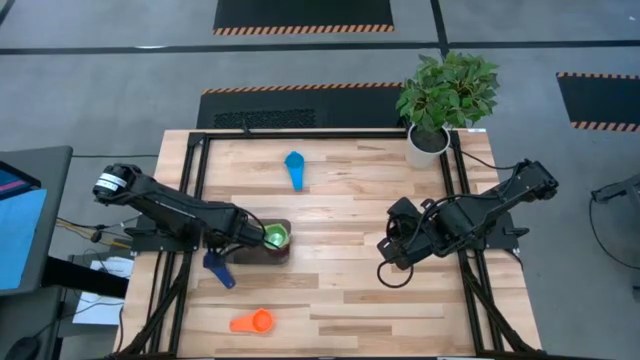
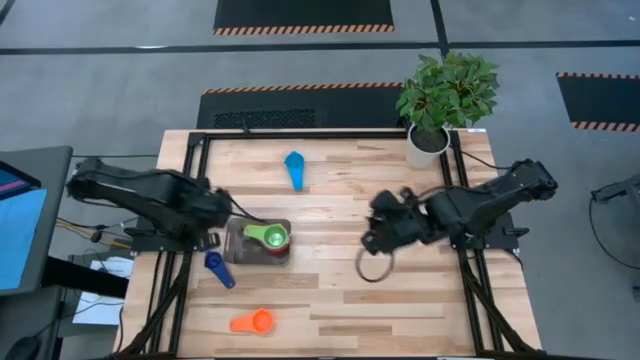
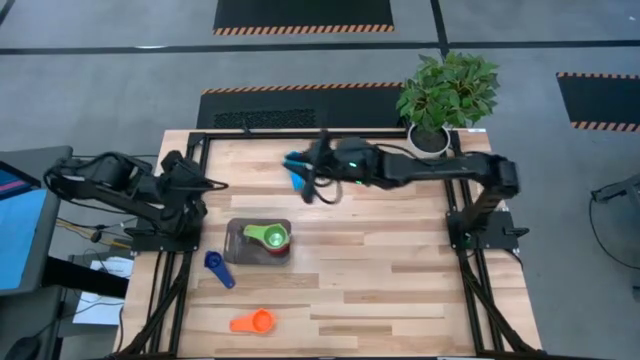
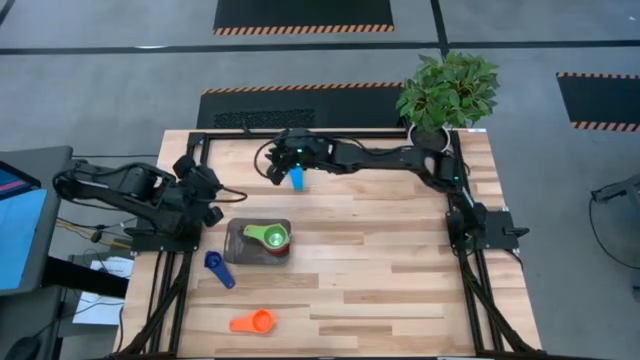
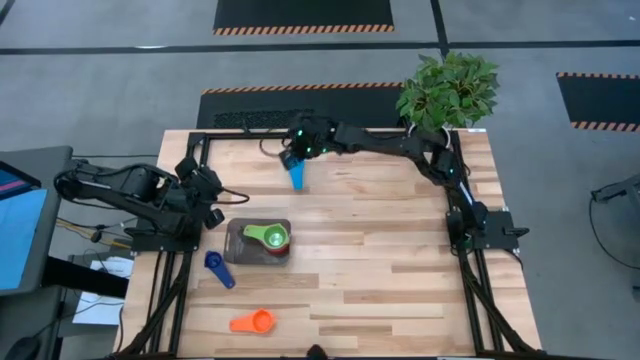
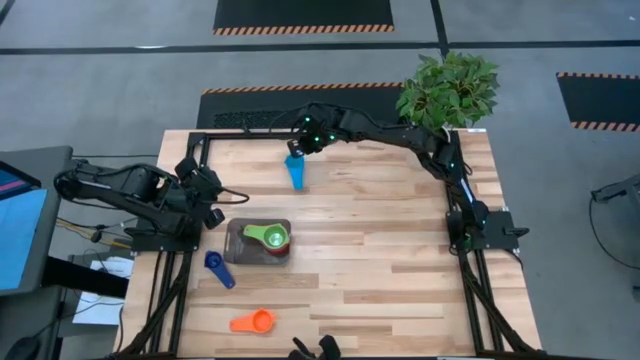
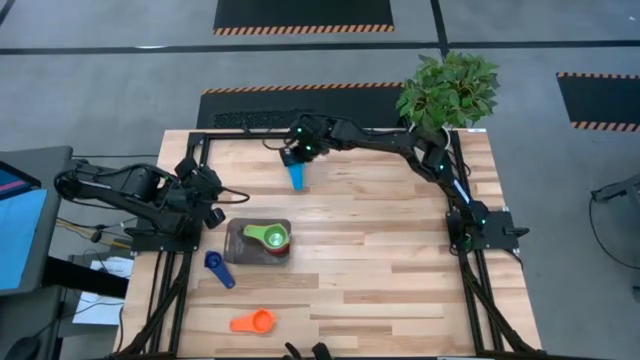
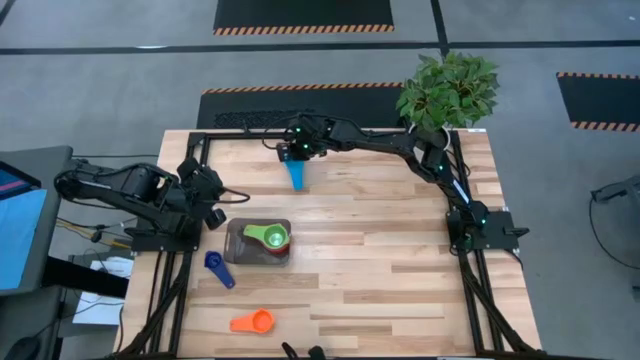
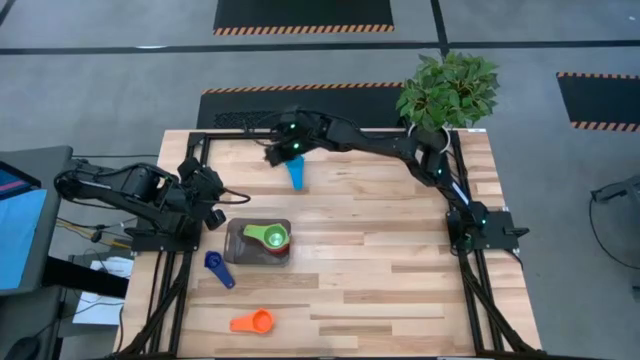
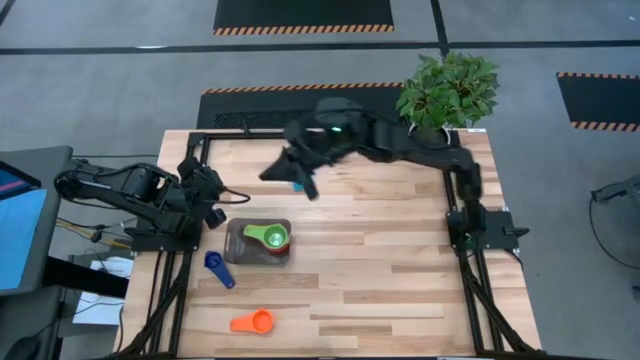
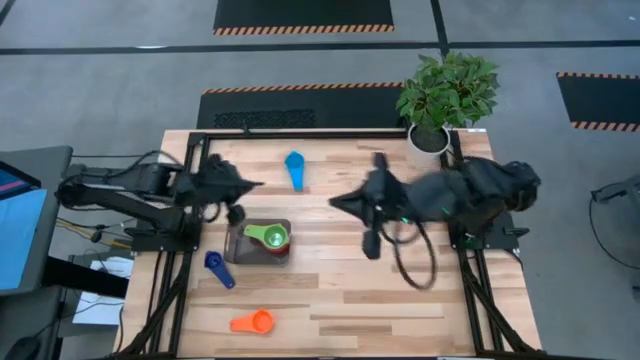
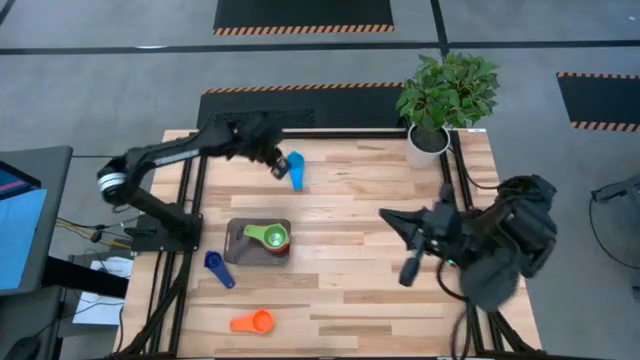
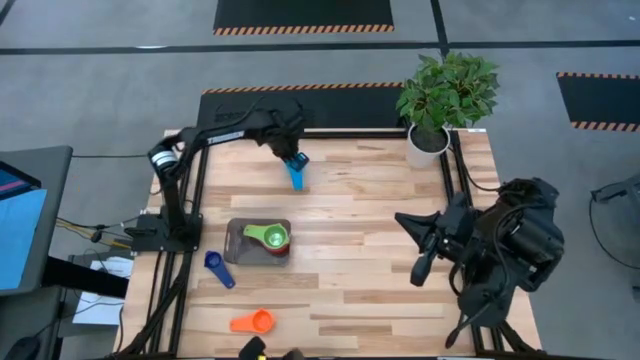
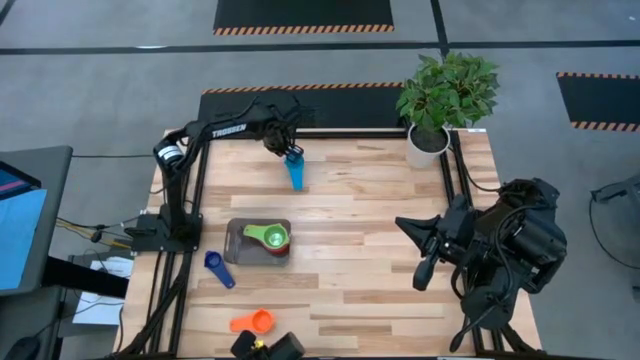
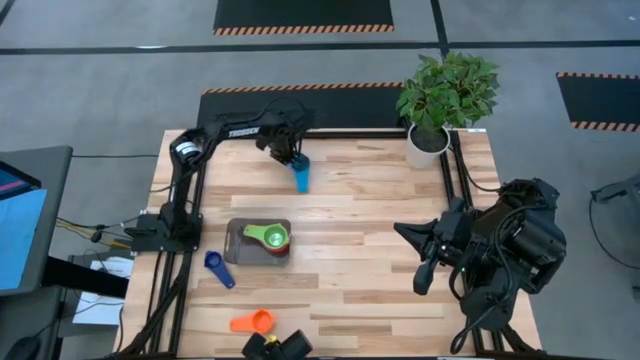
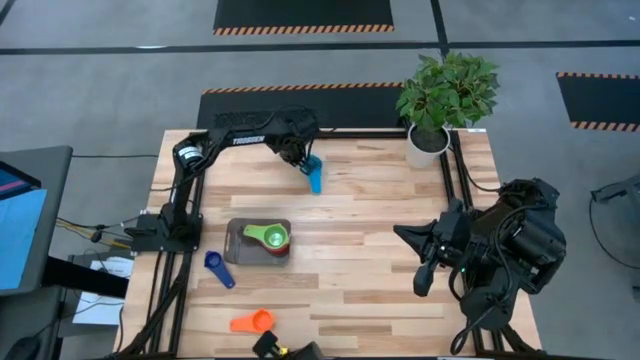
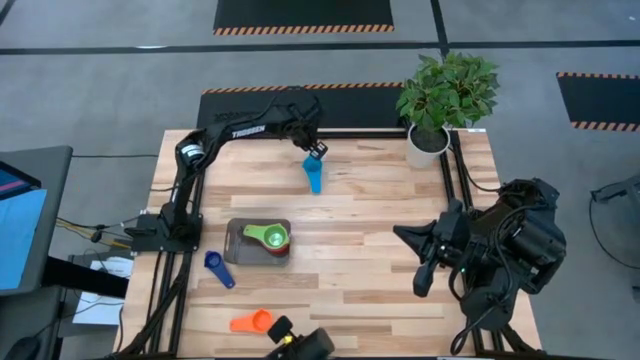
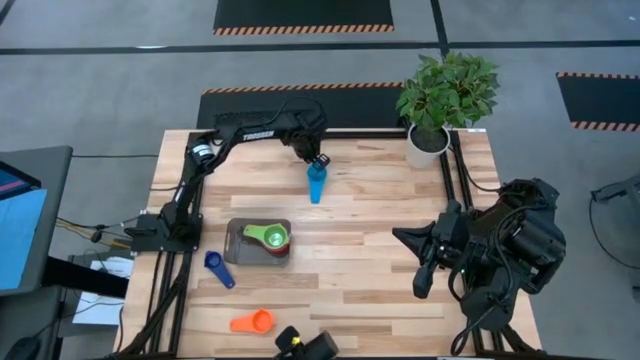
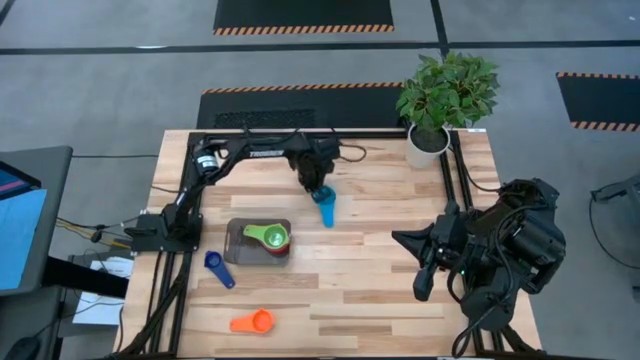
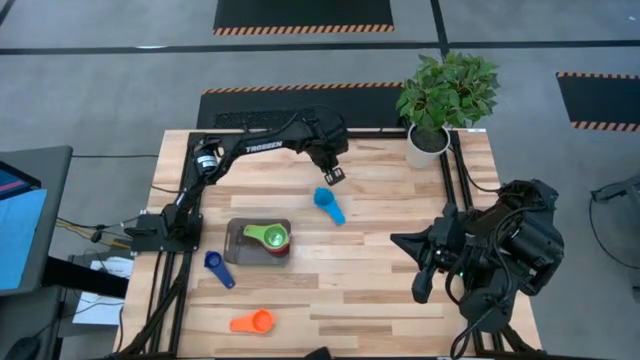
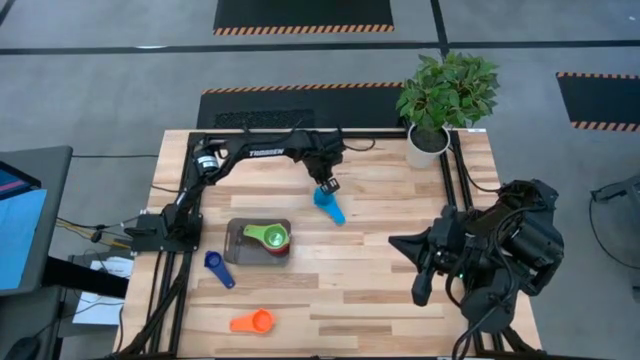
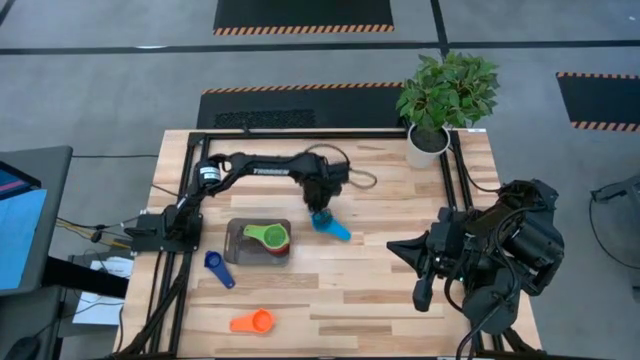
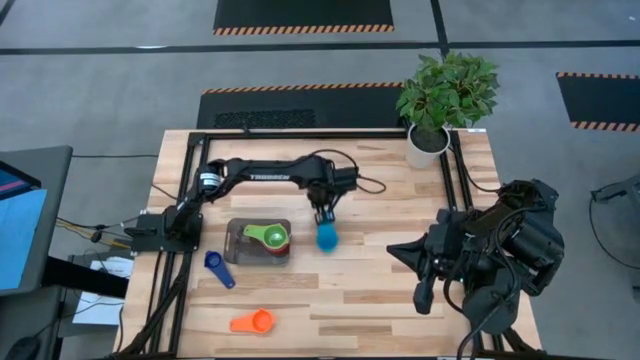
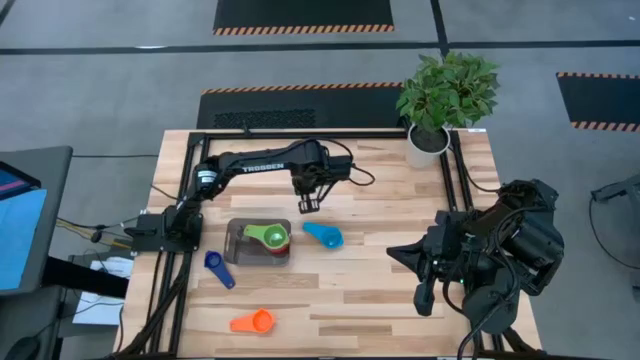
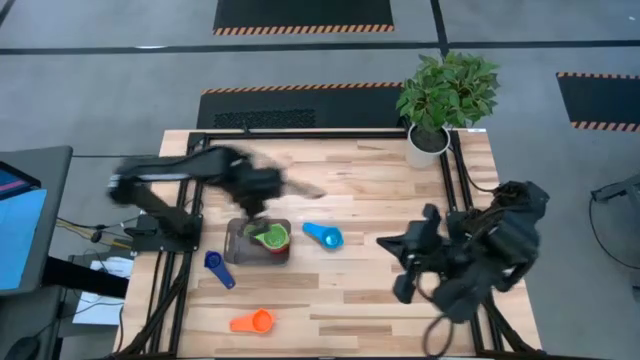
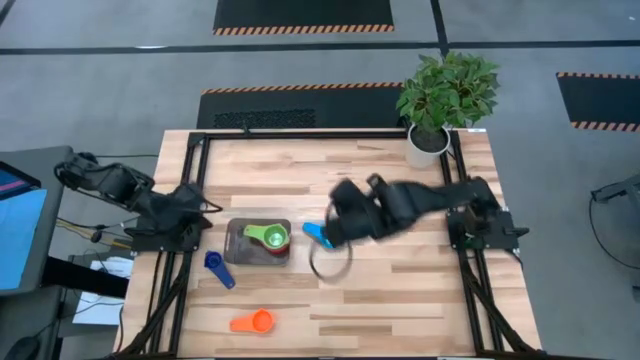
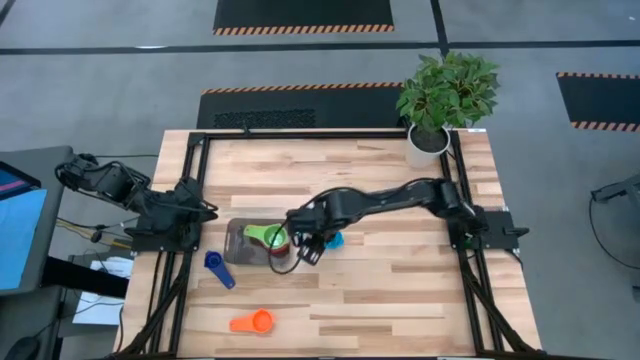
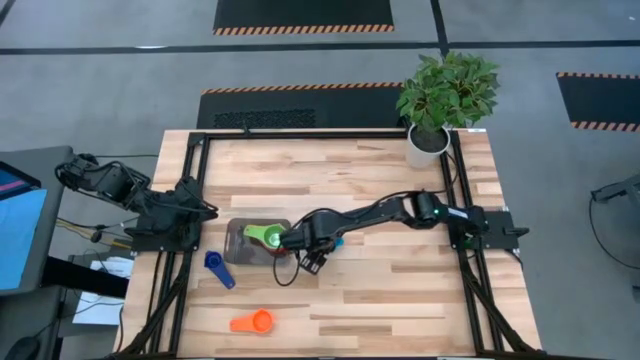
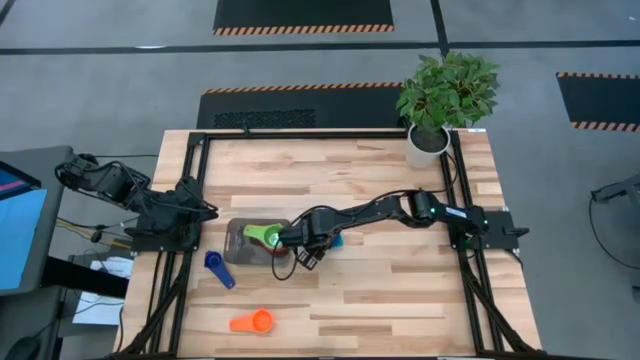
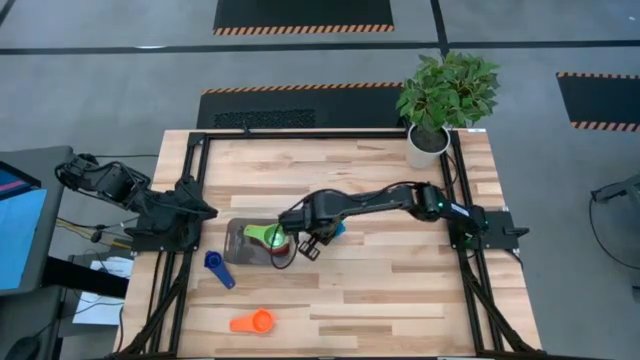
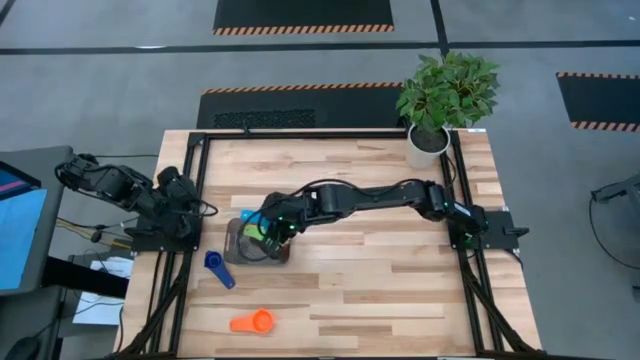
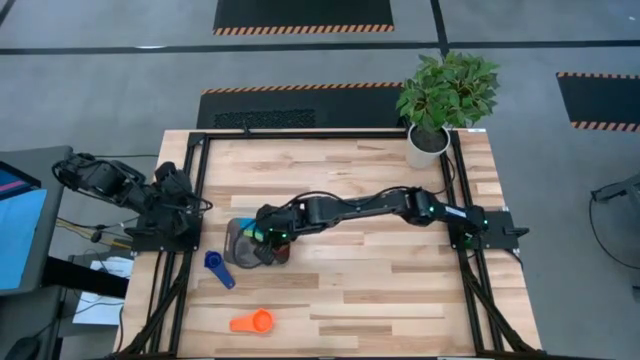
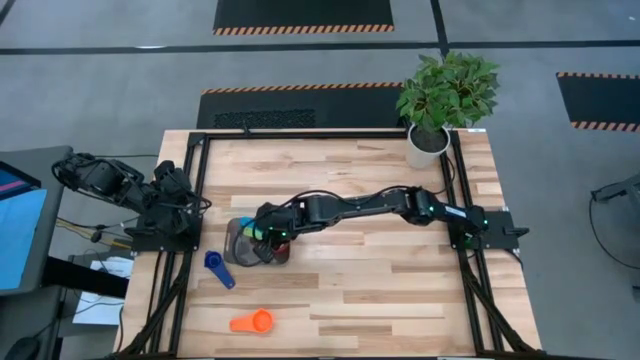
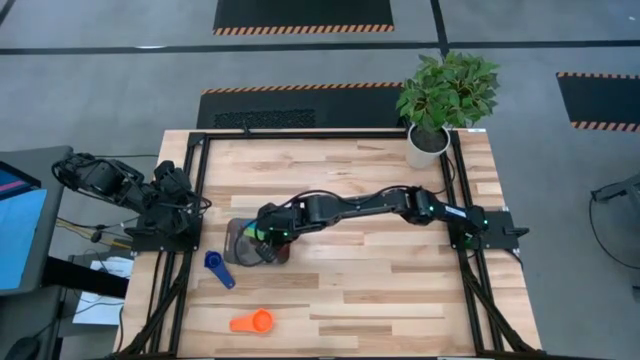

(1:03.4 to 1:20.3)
Task: Nest measuring cups in basket
Stack the light blue measuring cup on top of the green measuring cup in the black bin

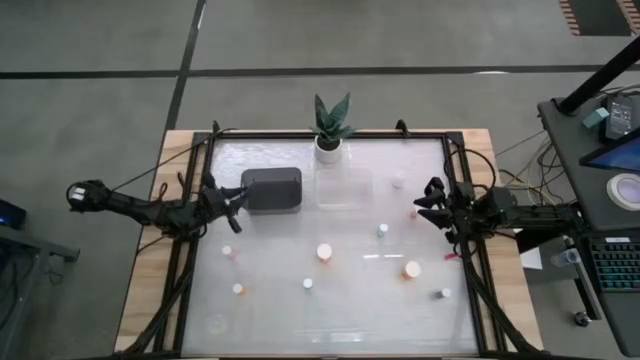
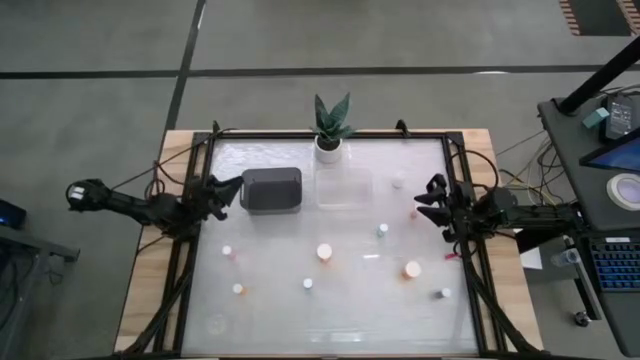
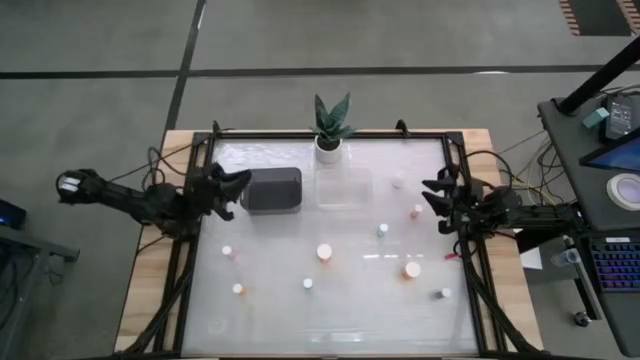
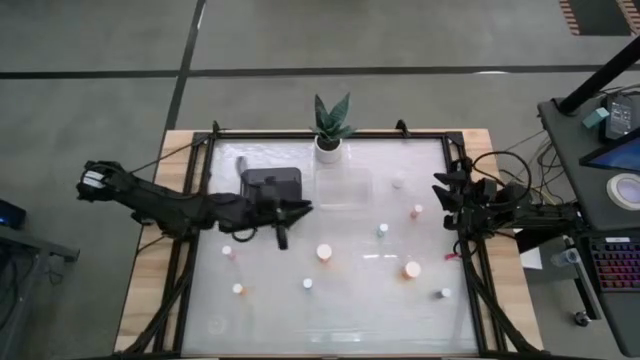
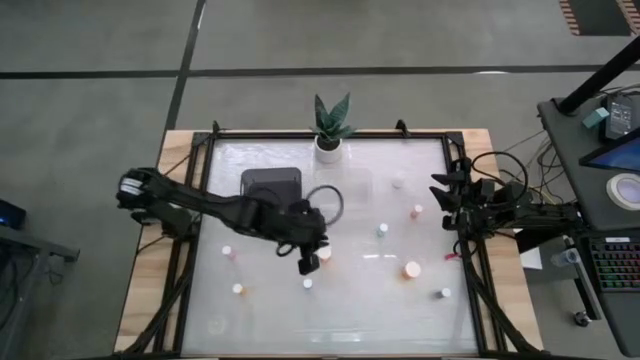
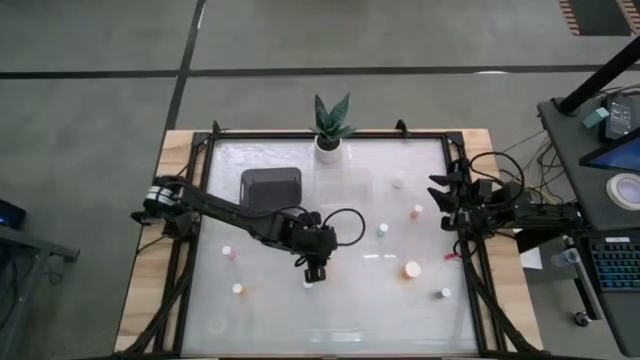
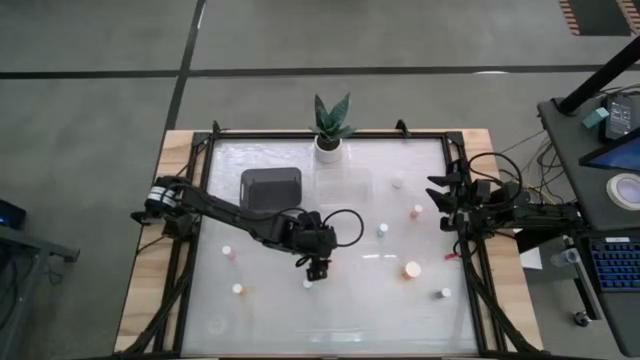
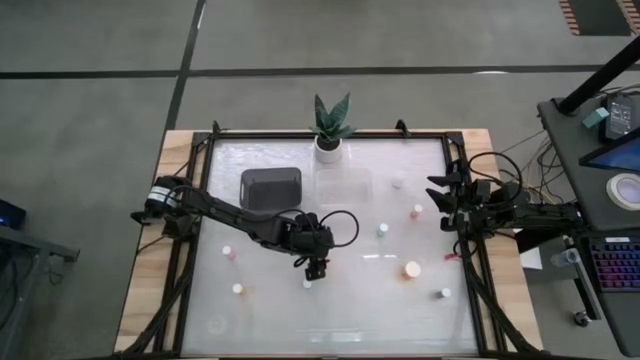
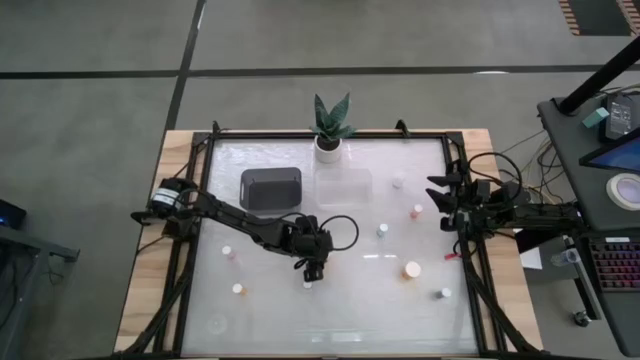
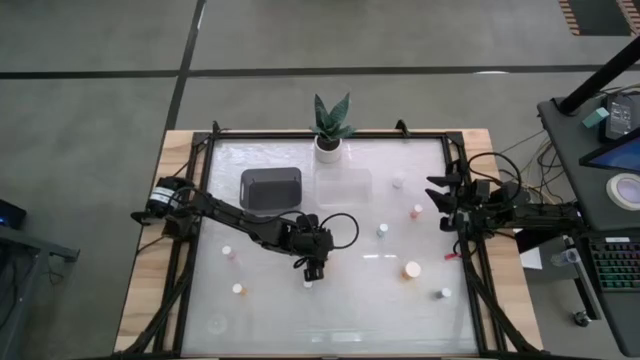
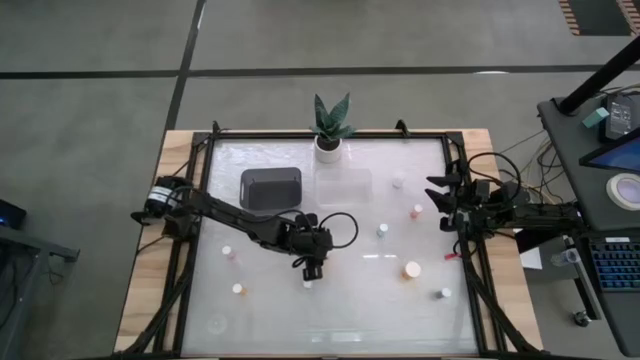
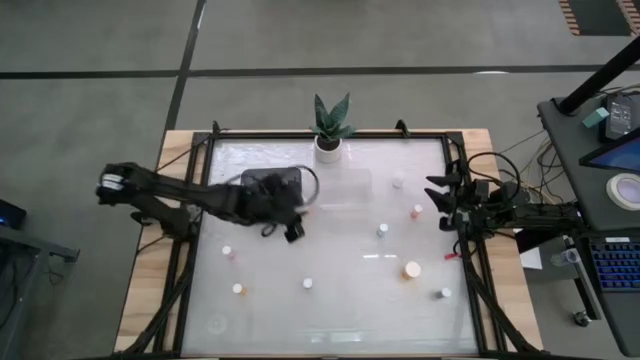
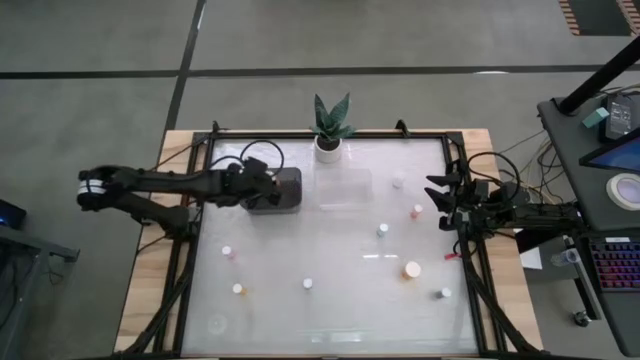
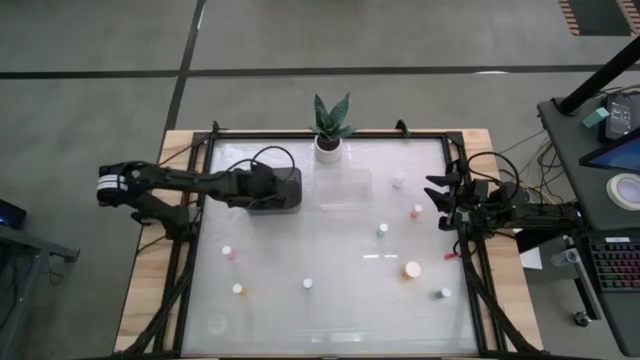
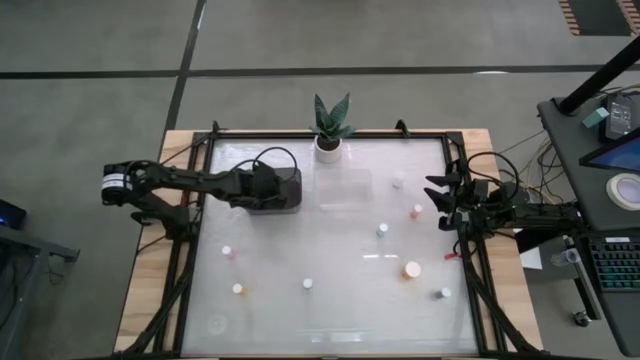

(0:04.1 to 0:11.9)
Task: Pick and place medicine bottles into bin by pill shape (circle, oval)
Put the left large orange capsule bottle into the black bin
